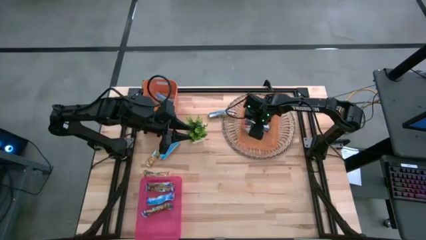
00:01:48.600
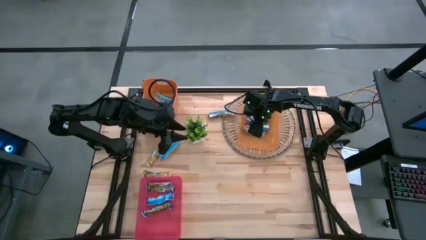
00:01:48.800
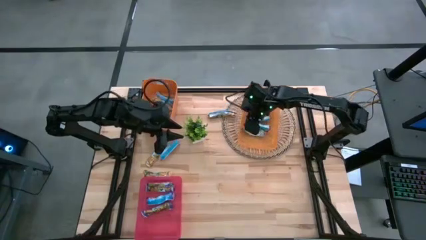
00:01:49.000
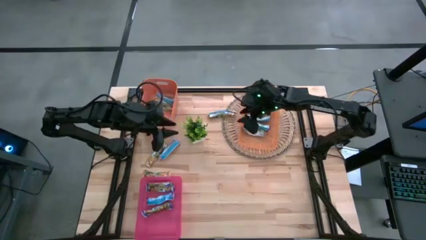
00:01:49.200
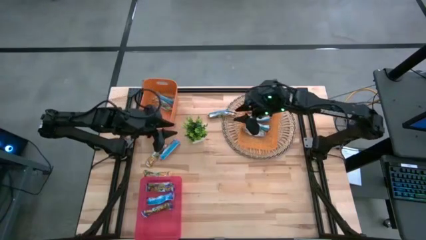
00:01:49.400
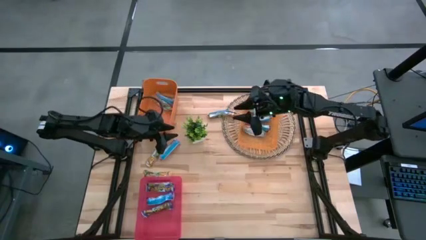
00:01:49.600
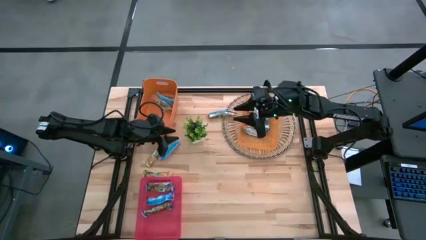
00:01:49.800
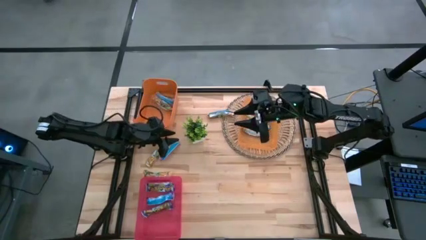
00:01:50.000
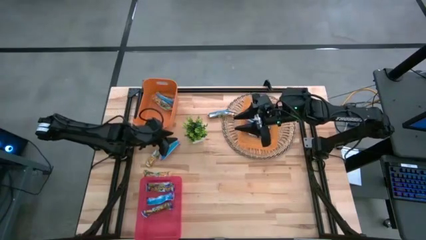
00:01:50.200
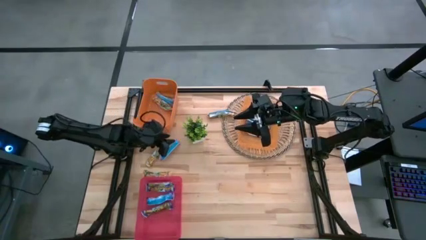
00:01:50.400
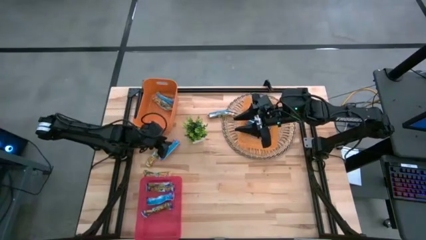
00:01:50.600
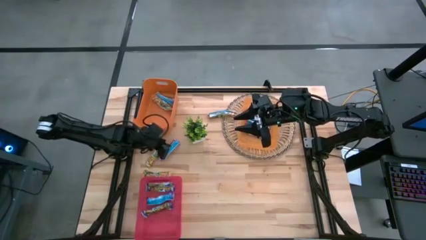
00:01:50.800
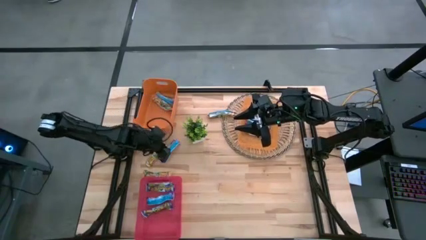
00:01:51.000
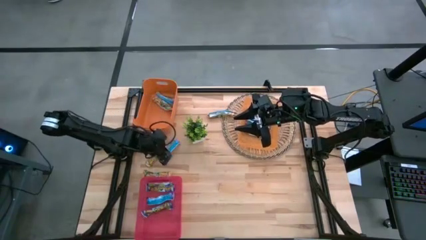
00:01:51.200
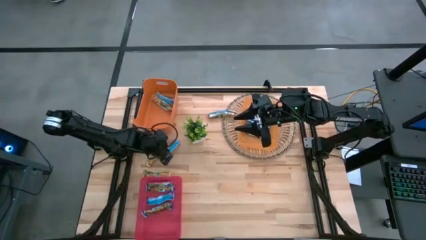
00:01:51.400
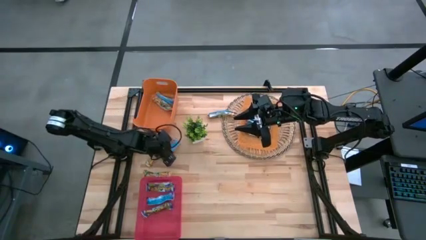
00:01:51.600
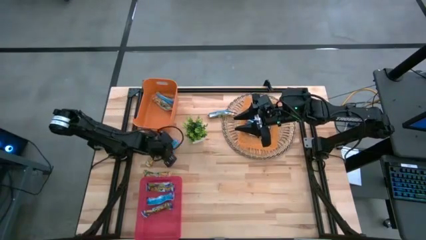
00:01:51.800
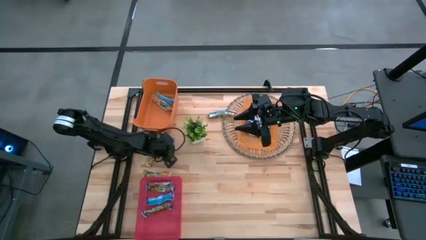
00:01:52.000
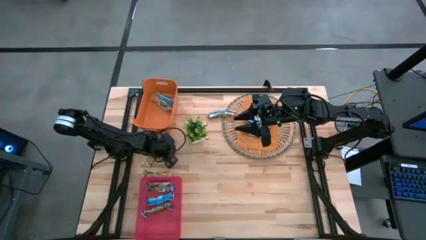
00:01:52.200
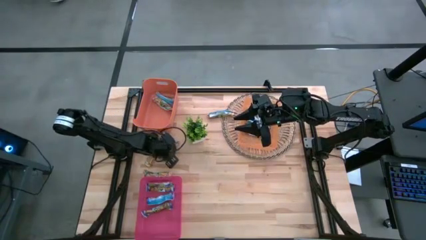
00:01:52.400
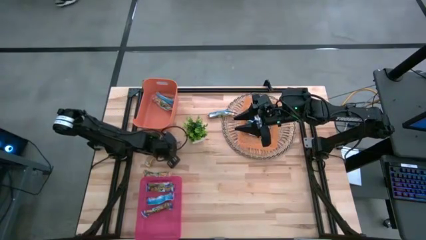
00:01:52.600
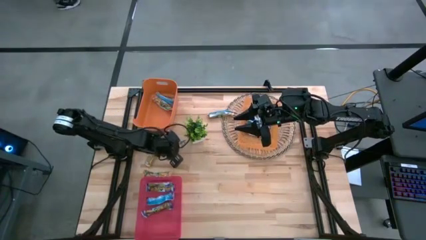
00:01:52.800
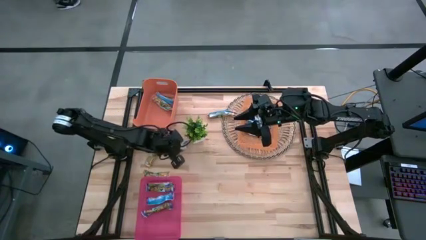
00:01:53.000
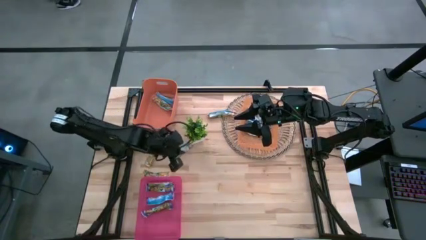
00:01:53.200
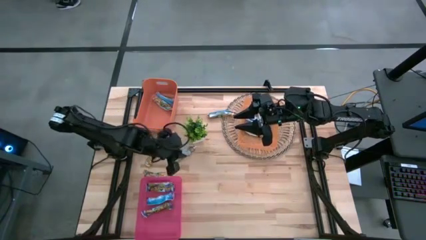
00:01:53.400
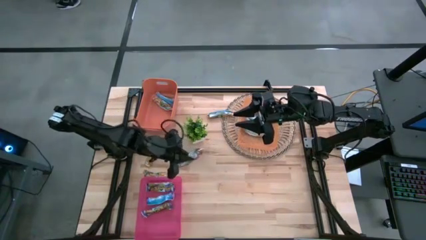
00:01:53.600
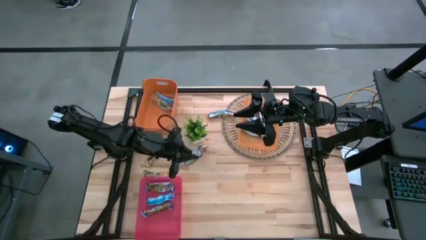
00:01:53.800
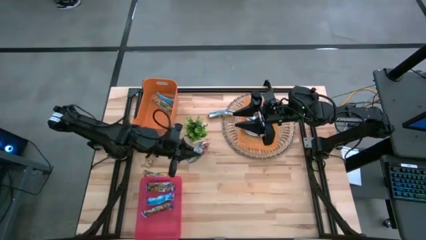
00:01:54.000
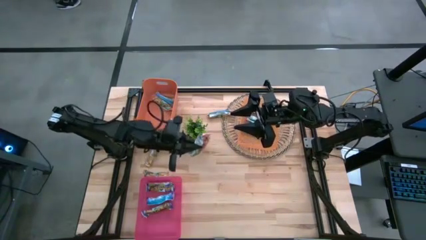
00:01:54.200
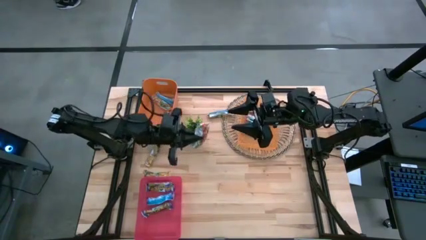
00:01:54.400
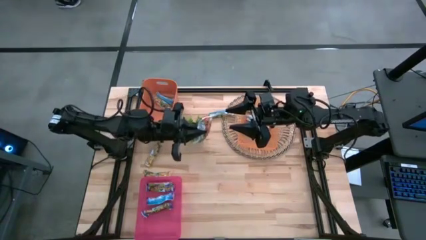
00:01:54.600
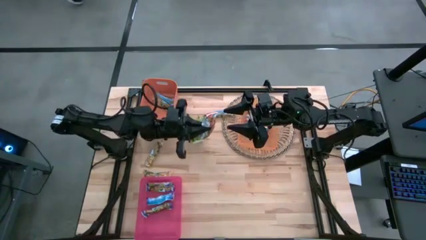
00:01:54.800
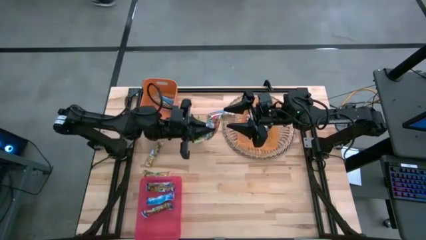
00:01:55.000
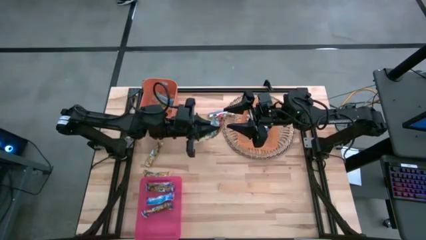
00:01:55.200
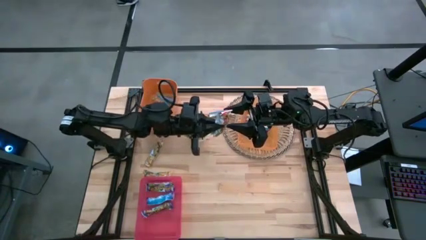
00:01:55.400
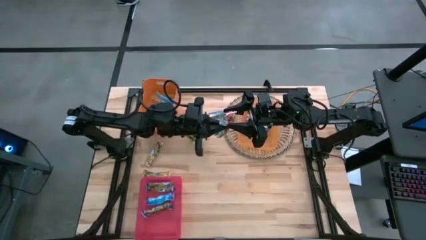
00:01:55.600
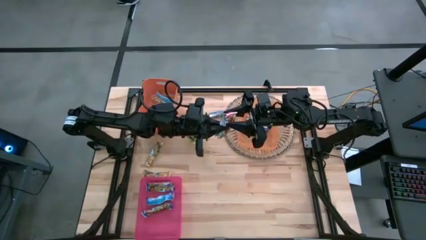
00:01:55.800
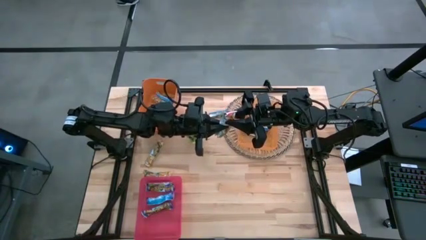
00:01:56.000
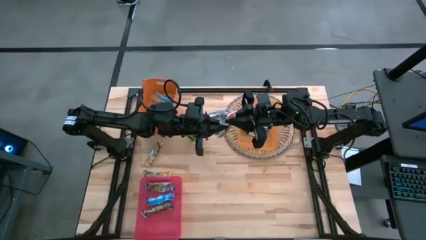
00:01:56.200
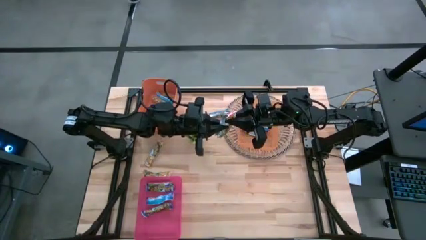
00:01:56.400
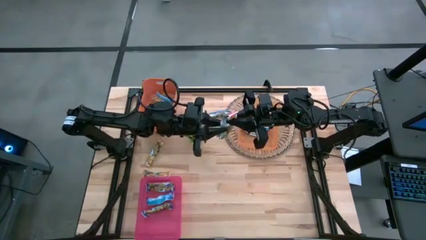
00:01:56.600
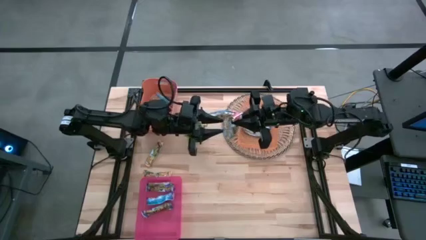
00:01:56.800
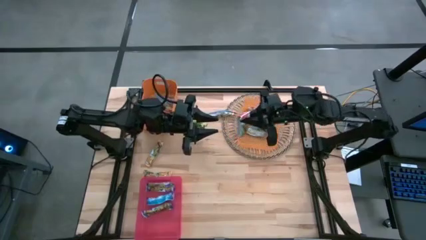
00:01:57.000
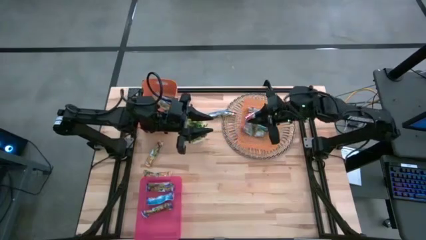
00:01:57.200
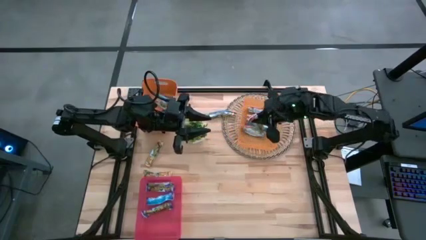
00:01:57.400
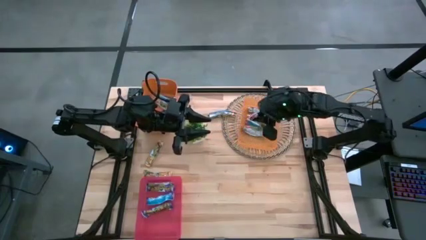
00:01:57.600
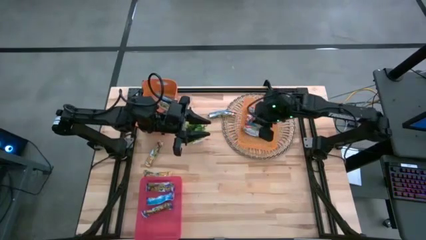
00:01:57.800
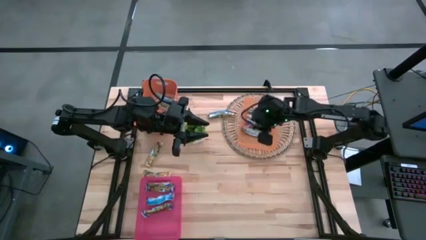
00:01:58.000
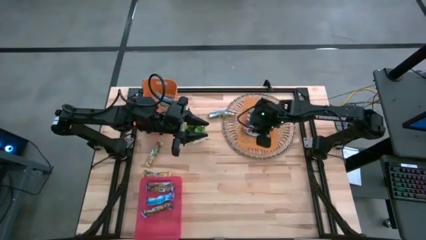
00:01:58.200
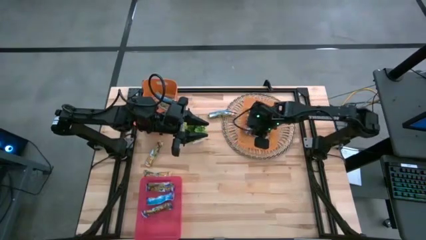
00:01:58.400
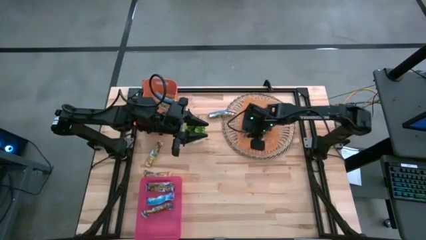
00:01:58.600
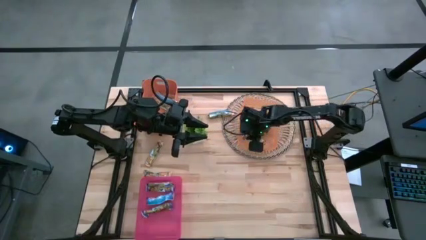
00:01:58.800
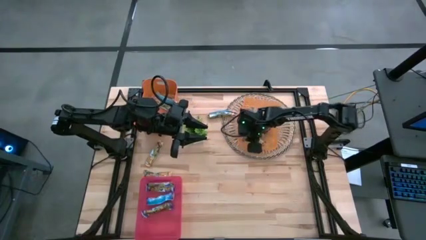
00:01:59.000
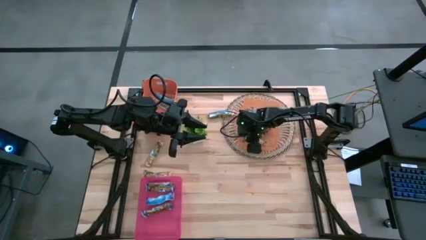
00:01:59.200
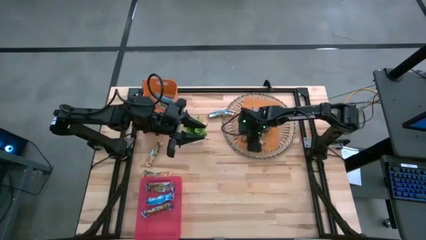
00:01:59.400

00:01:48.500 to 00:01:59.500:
Task: Pick and place Granola Bars by type
Put the red granola bar into the right orange bin
